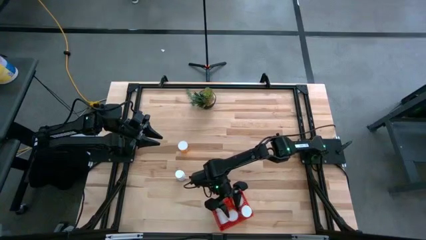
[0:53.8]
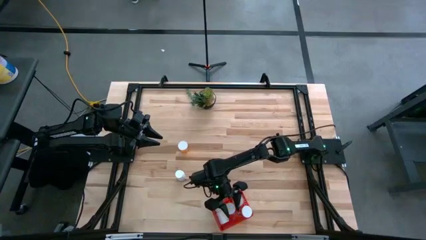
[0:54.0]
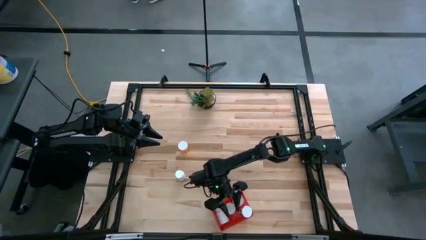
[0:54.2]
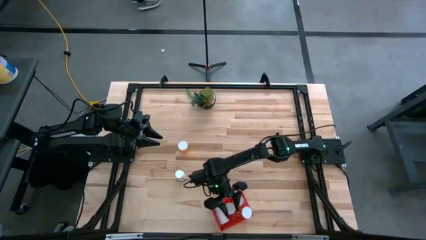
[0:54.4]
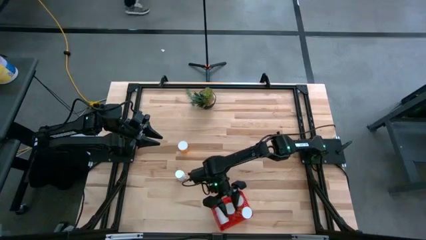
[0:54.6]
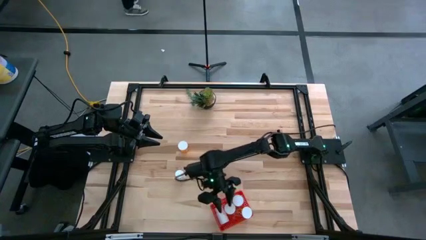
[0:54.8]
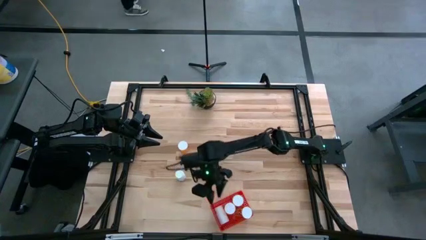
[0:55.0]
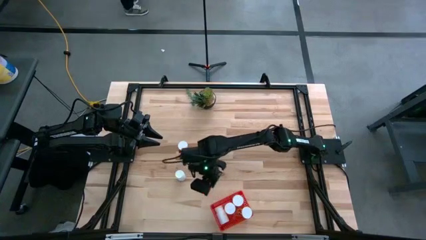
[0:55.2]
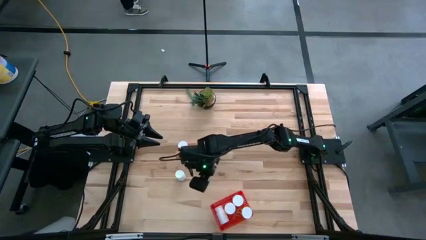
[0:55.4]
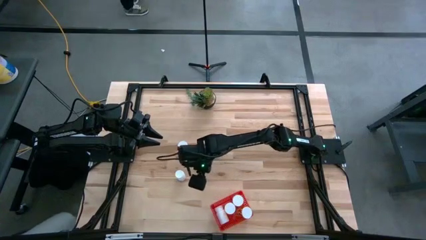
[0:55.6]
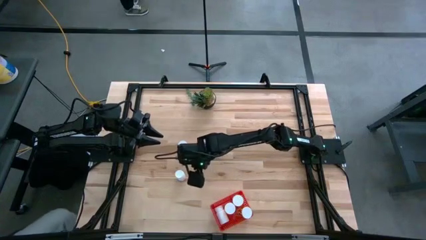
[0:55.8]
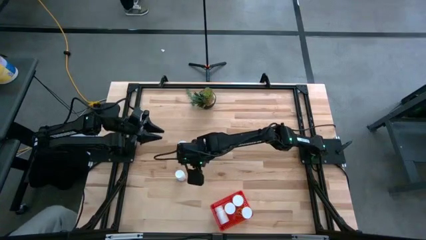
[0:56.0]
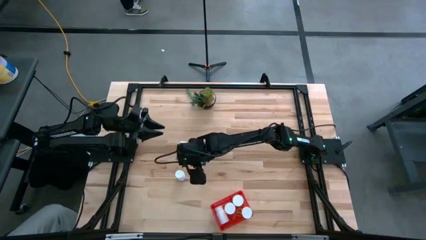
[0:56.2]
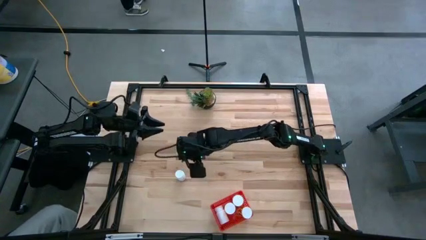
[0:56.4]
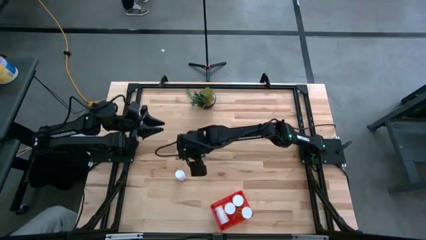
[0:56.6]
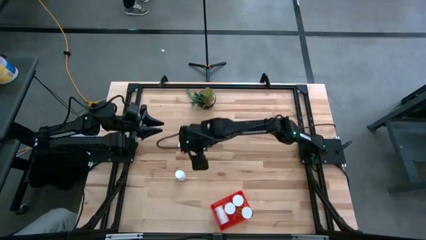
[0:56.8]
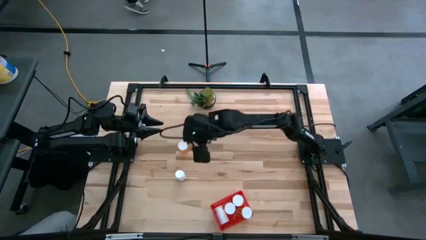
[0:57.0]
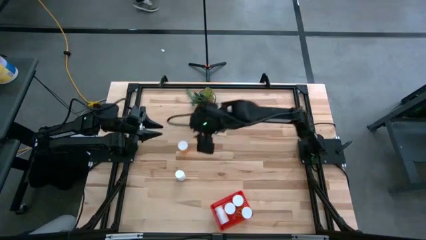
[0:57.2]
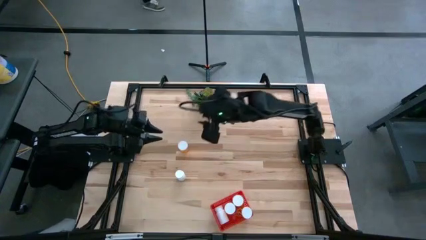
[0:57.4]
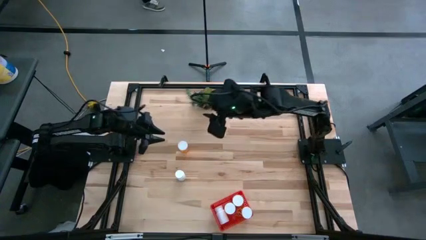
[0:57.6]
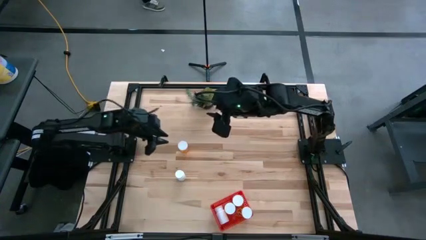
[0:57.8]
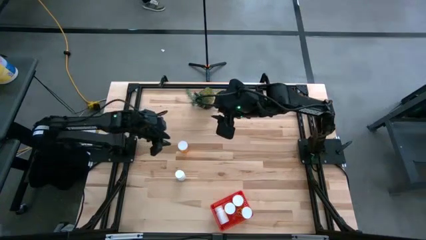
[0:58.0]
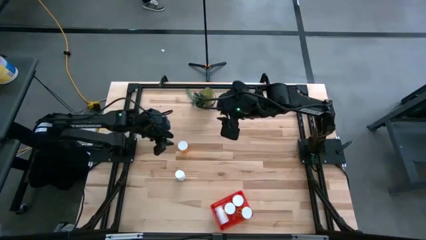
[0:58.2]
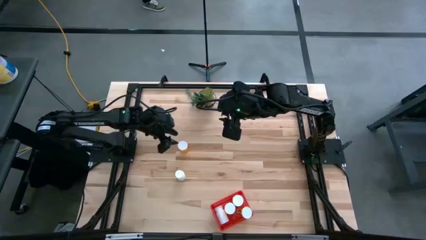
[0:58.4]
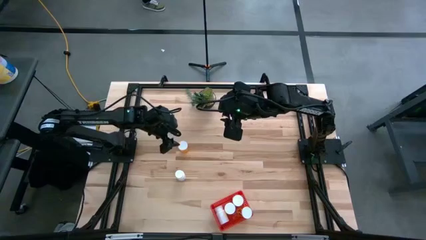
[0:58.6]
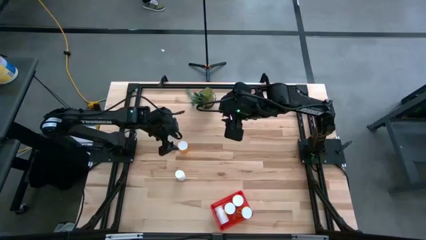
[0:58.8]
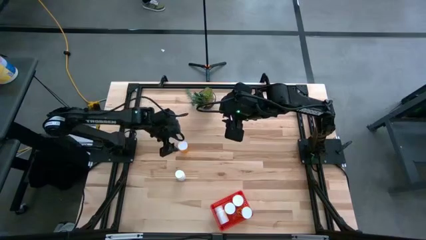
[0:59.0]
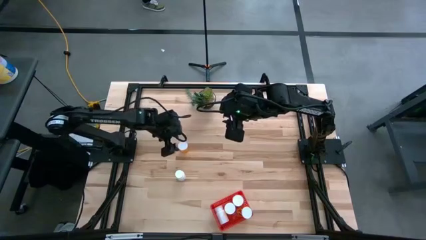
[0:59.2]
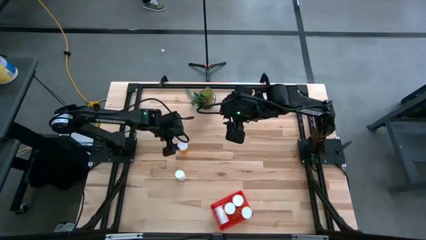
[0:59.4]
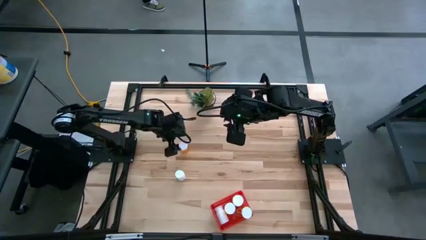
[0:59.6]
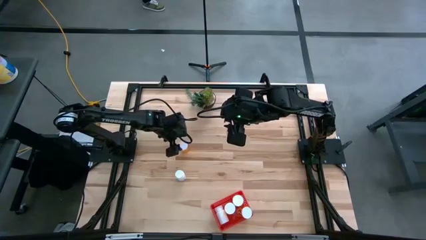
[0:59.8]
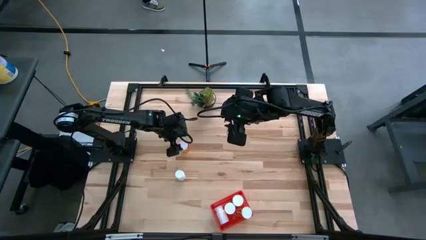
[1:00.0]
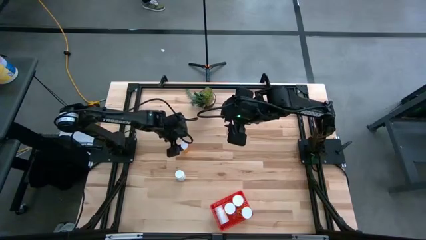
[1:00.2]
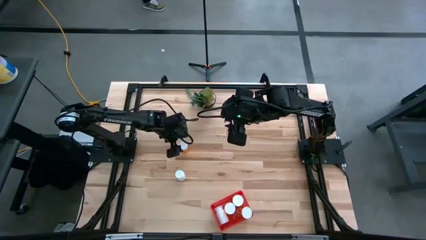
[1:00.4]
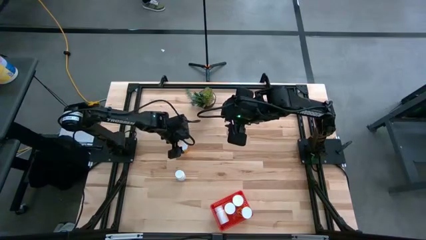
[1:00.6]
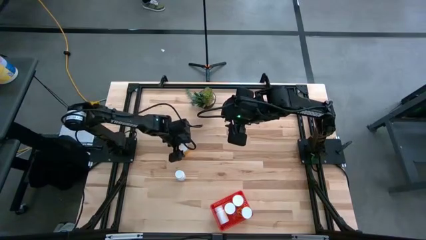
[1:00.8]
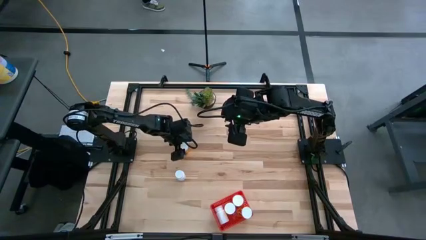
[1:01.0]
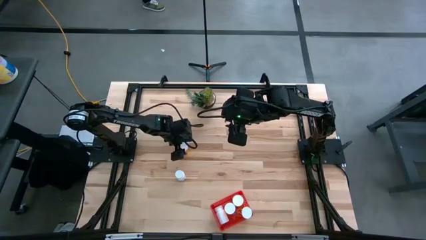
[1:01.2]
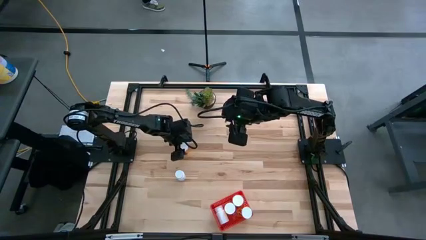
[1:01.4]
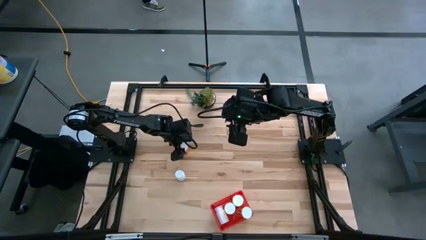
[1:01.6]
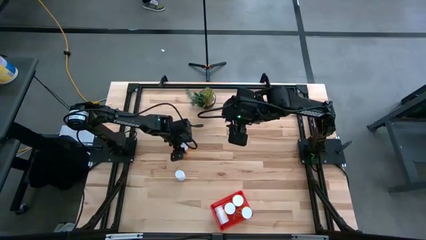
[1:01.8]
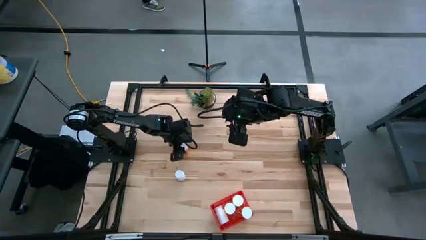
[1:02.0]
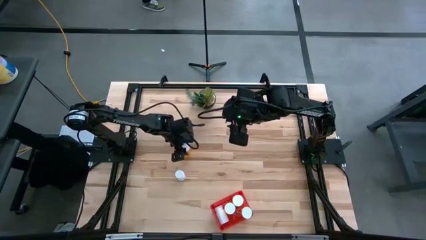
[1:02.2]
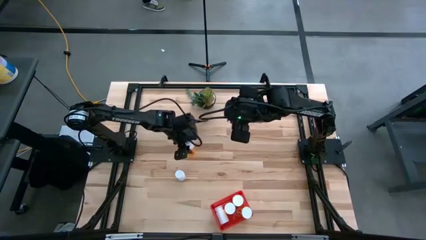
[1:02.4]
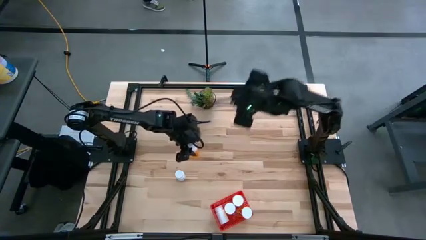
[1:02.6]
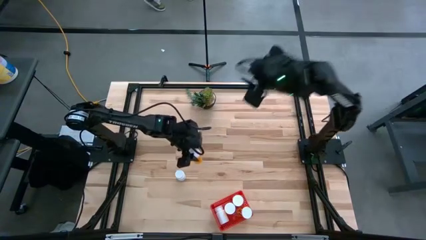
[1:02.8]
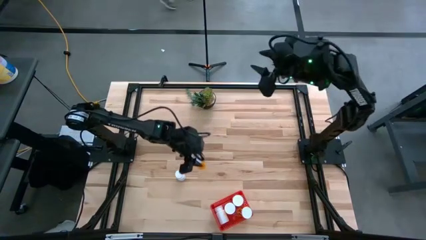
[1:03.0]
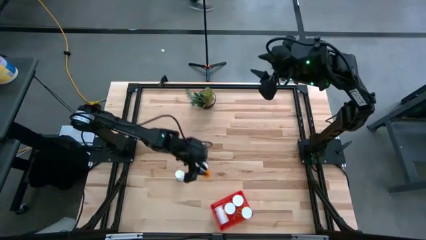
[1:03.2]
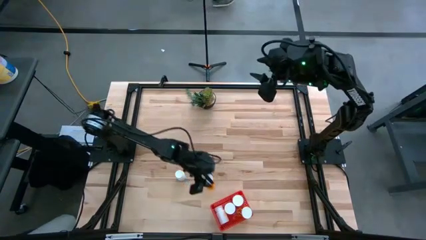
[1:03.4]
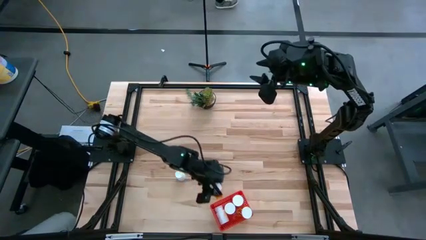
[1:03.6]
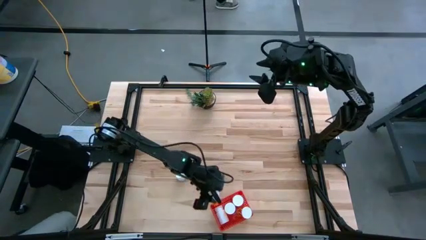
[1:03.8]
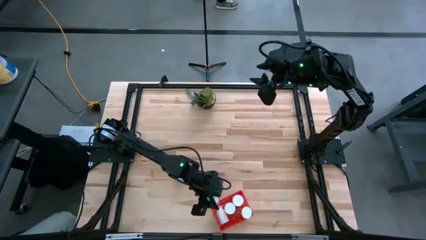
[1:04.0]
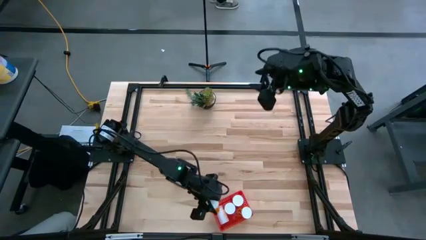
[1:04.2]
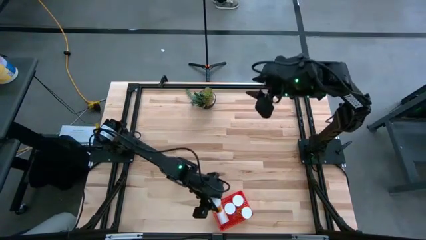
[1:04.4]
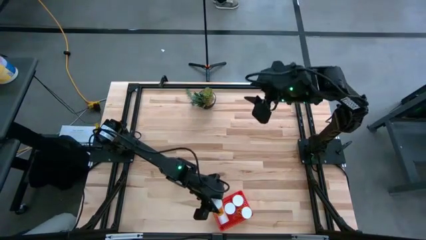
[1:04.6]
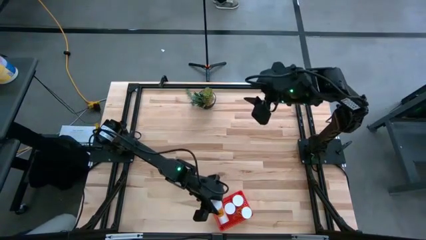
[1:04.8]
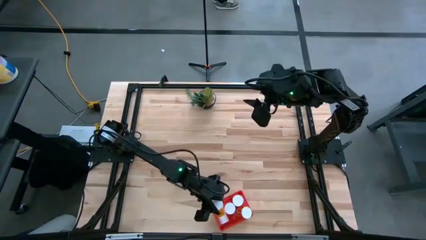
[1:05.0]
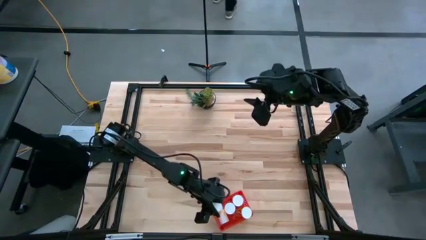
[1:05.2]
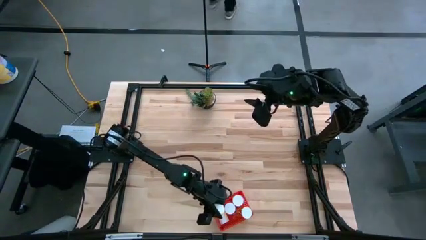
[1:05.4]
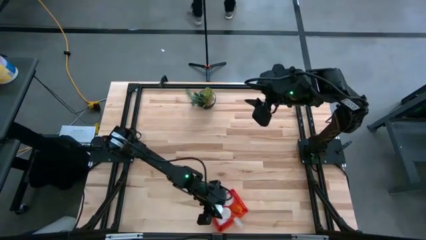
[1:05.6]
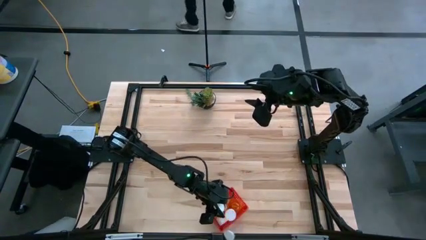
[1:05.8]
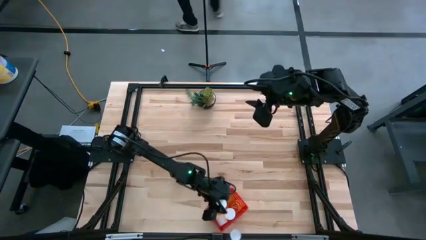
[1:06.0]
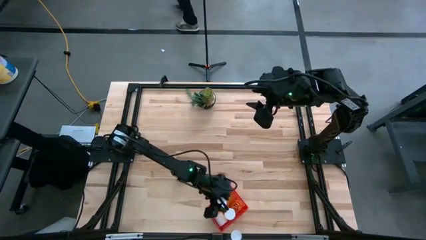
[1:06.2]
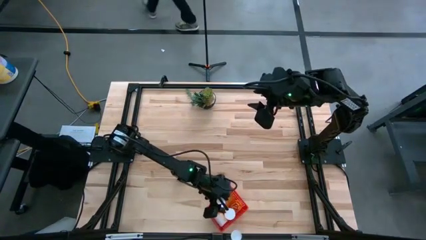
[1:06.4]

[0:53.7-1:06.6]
Task: Pick and place pill bottles into a basket
Put the orange pill bottle into the red bin

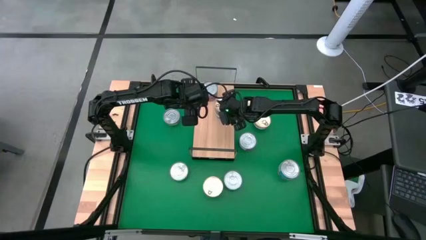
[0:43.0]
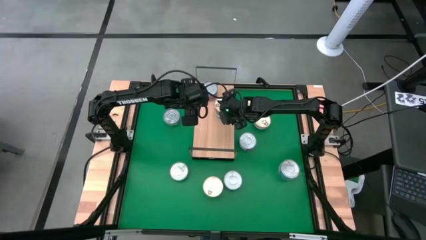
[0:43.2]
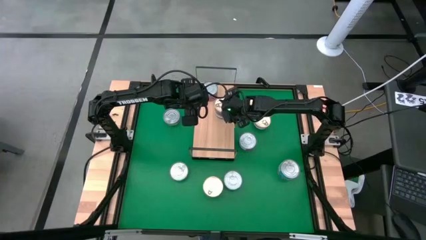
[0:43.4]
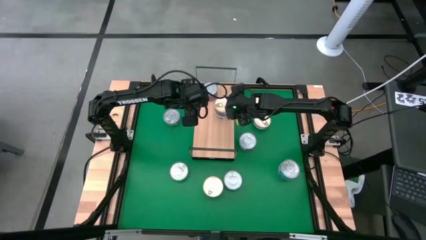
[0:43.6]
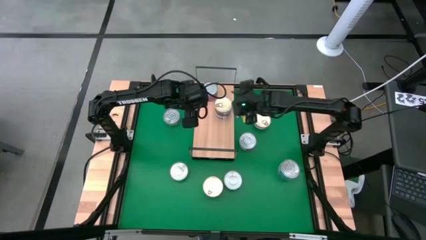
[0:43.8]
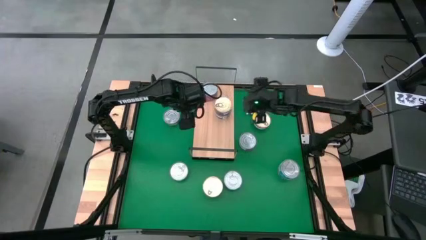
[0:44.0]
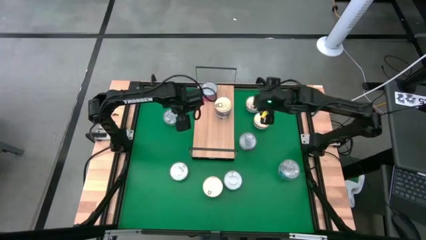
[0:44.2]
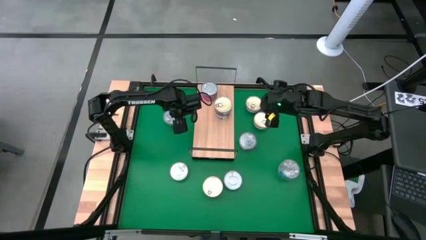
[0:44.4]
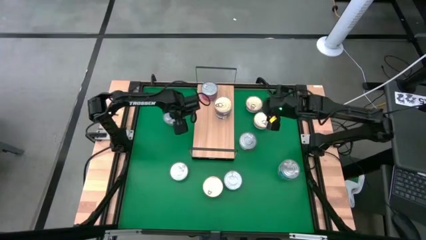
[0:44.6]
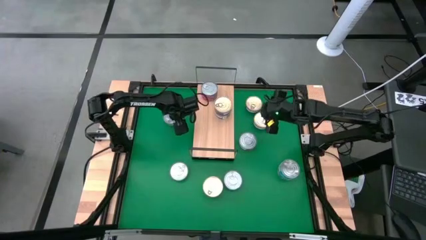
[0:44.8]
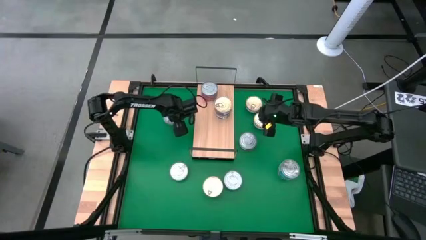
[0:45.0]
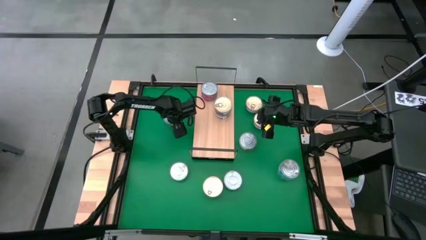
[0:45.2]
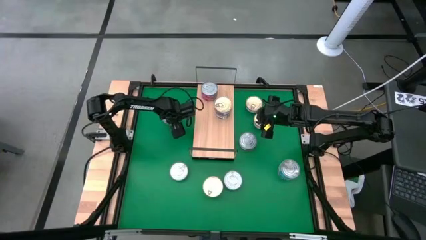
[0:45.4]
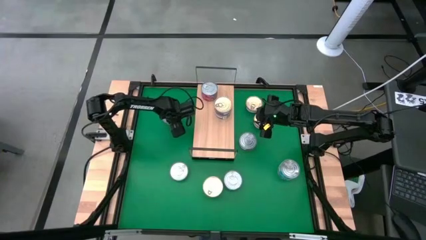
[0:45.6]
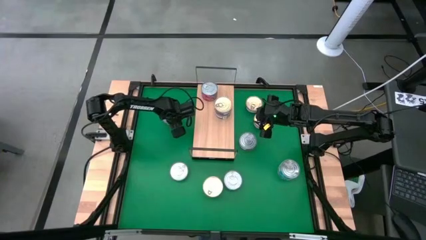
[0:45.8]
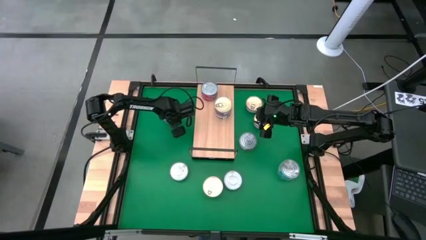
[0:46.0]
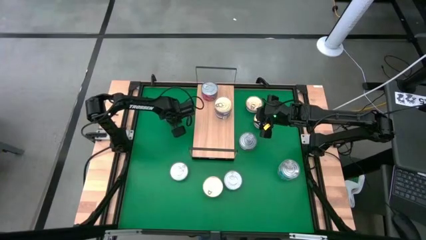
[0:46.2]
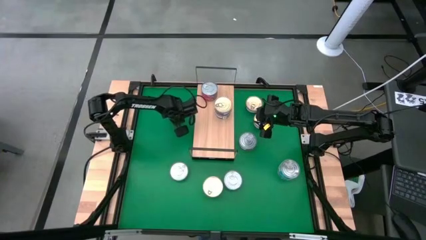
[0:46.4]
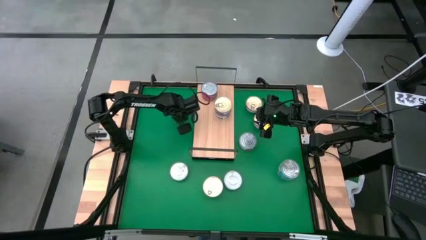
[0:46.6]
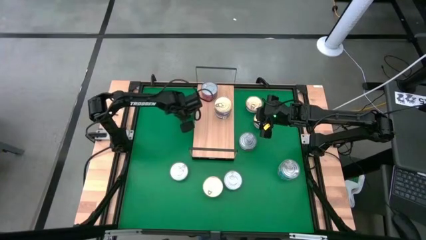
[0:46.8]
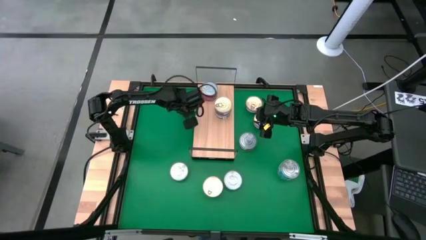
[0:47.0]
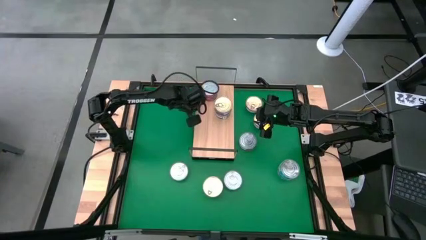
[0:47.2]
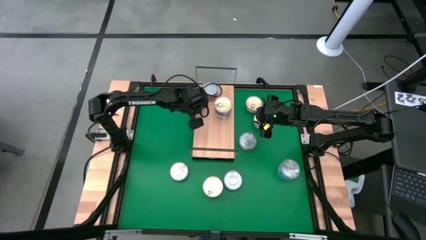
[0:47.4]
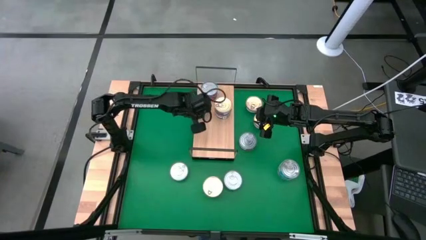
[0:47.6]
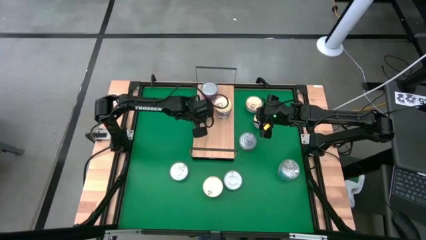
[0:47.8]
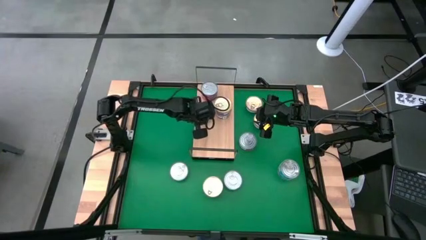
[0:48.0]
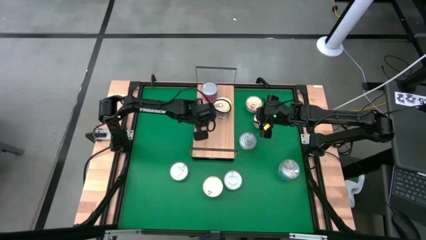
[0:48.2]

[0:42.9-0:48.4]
Task: Stack canned seafood by type on shelf
Put the green tuna can on the shelf
